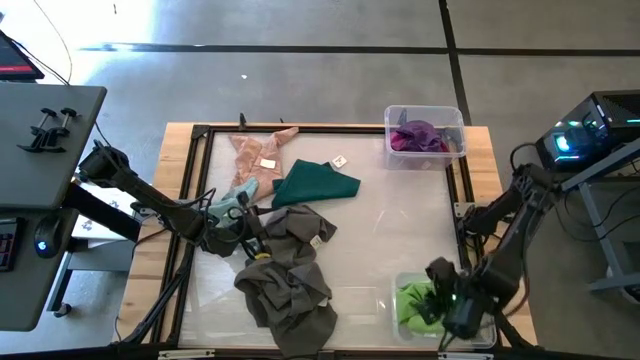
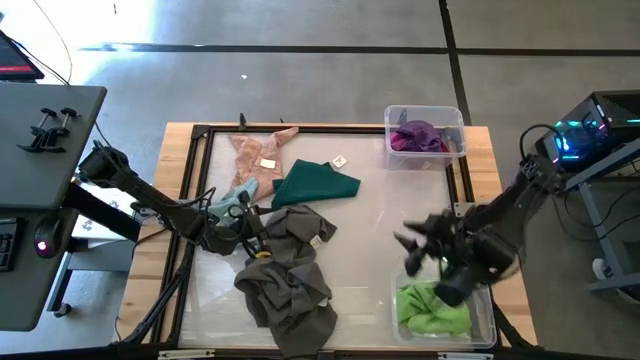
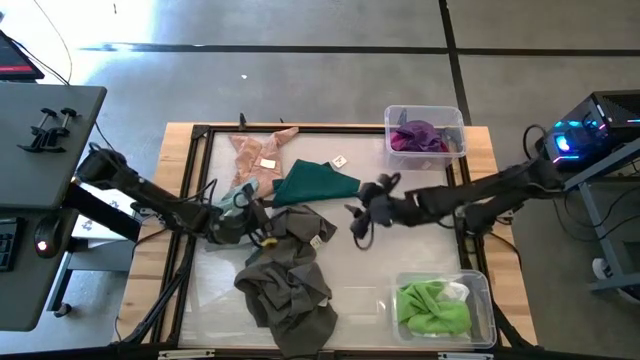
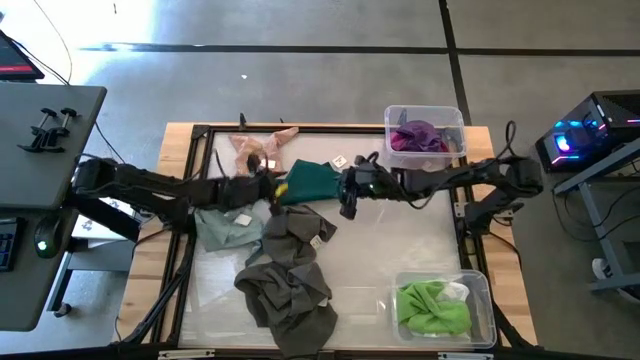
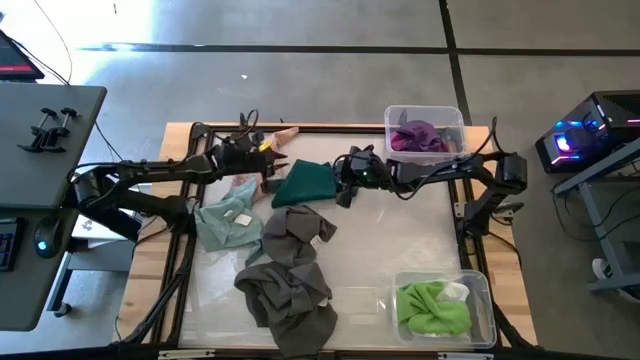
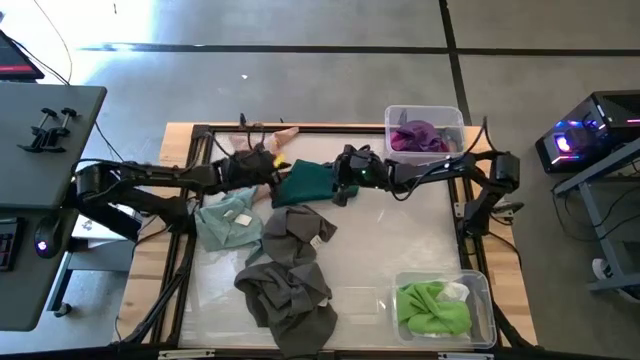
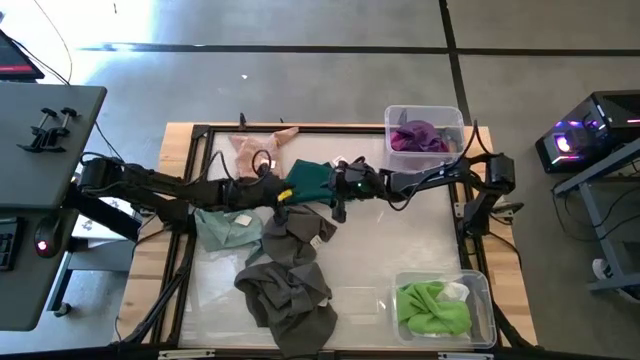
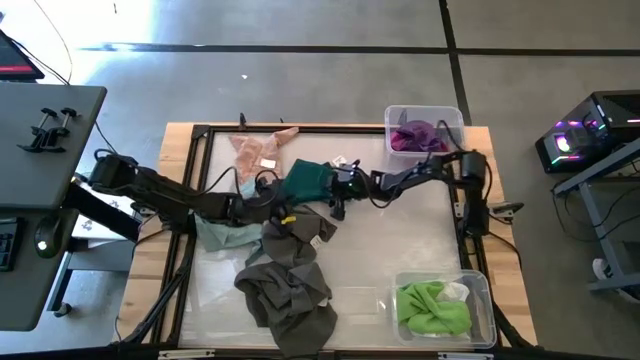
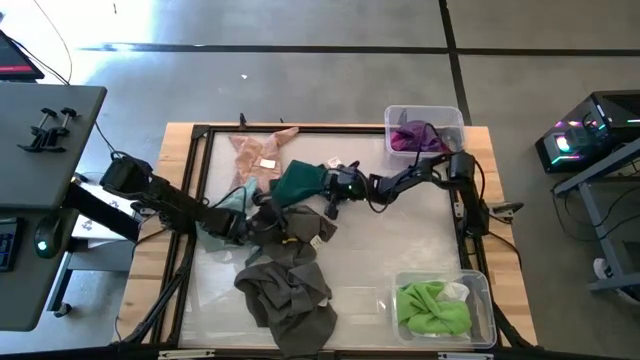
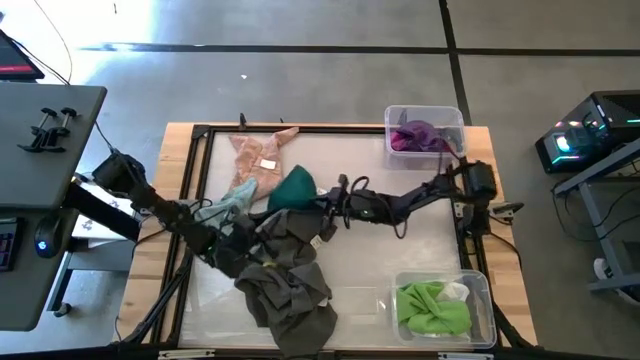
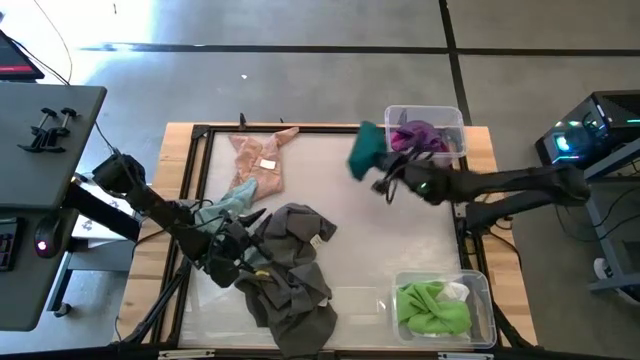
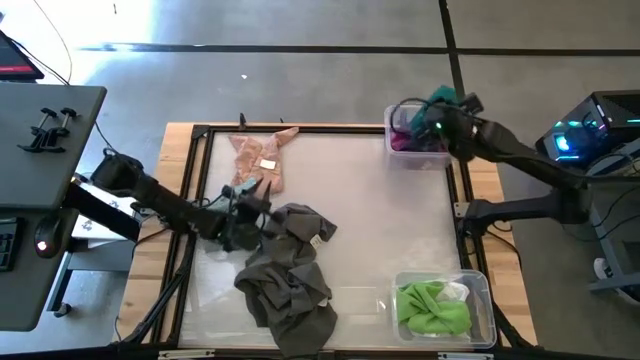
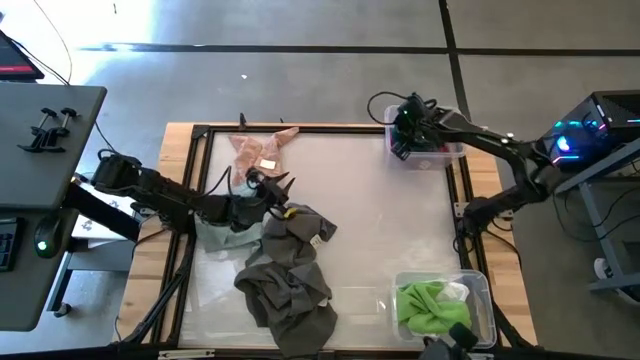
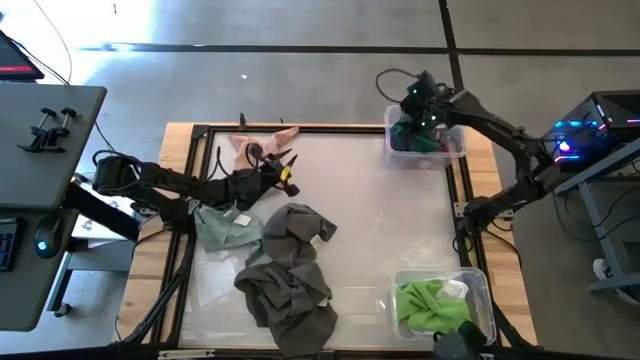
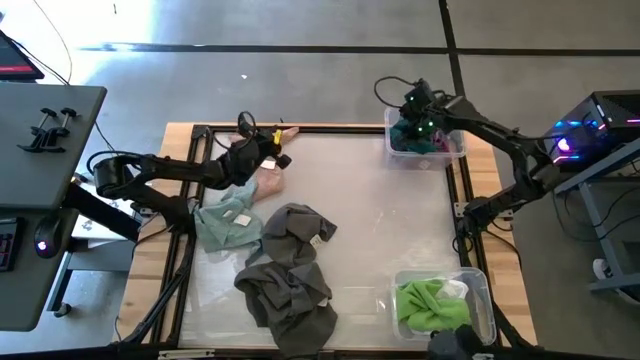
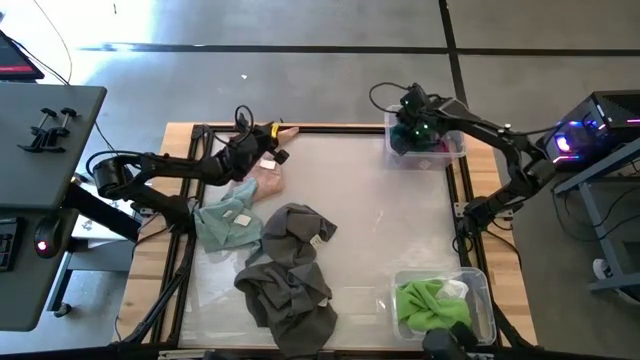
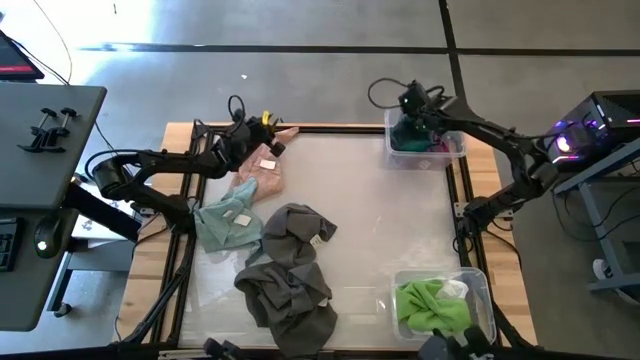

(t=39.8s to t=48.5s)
Task: Sort towels by color in basket
Put the dark green towel into the top transparent bin

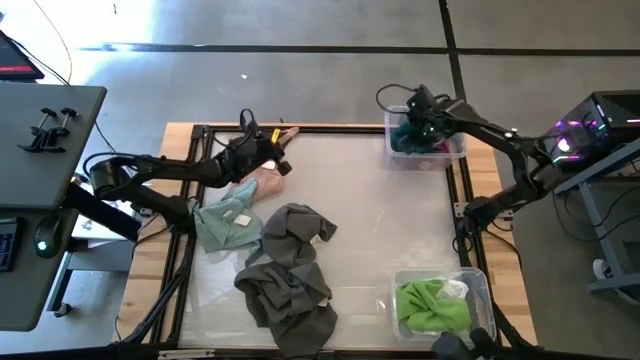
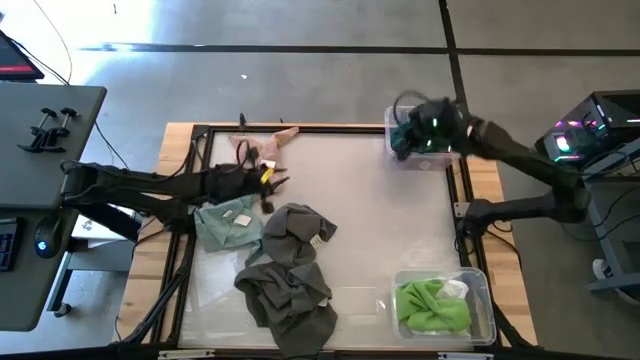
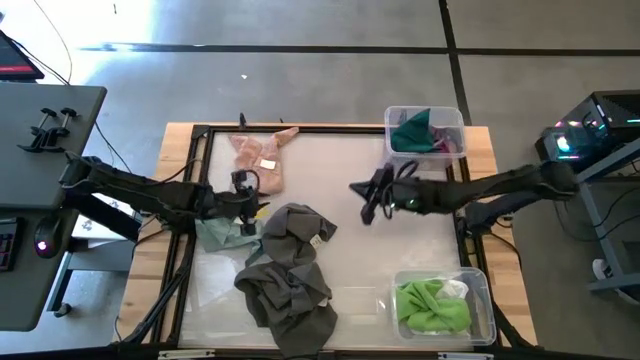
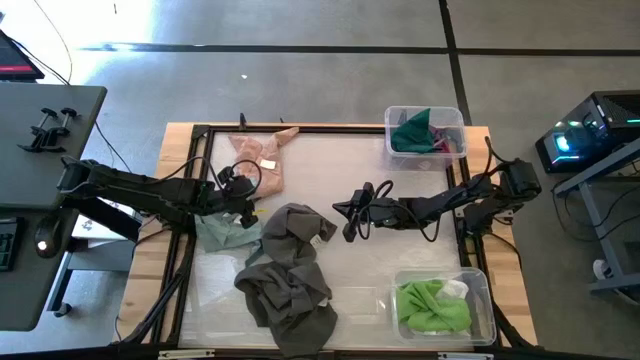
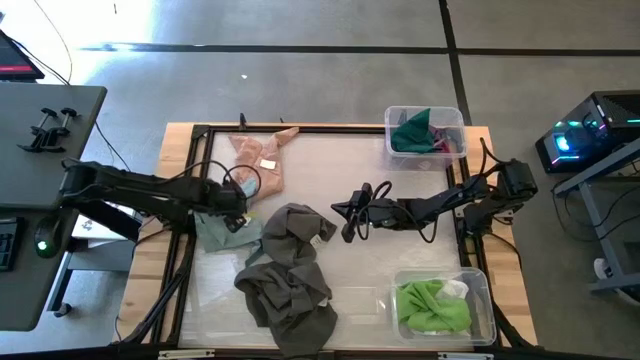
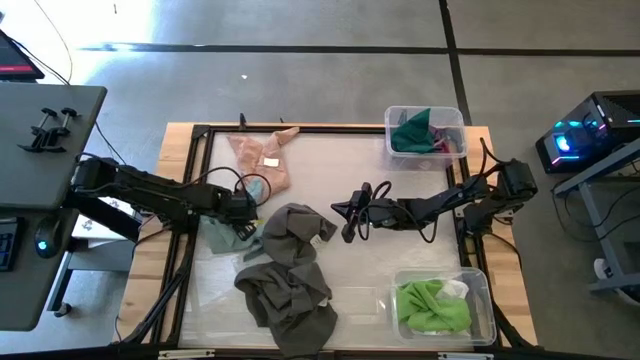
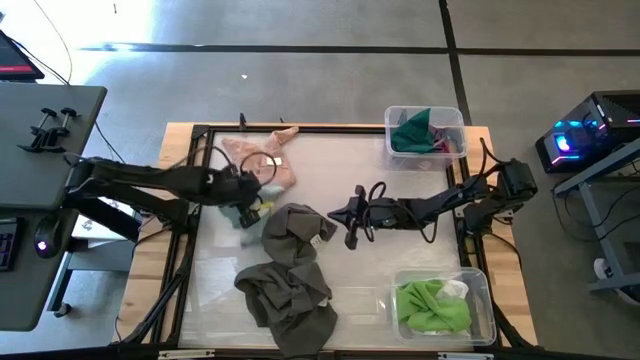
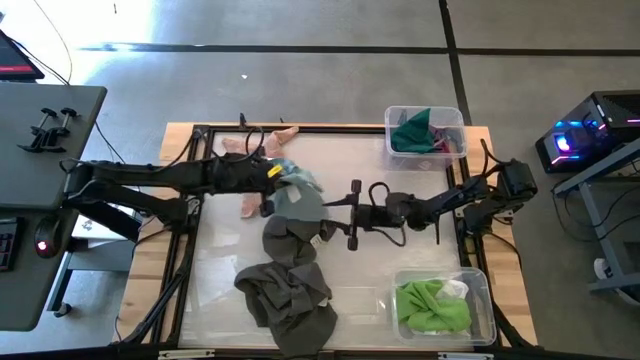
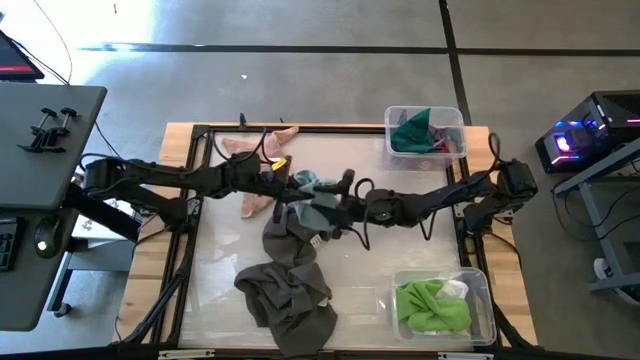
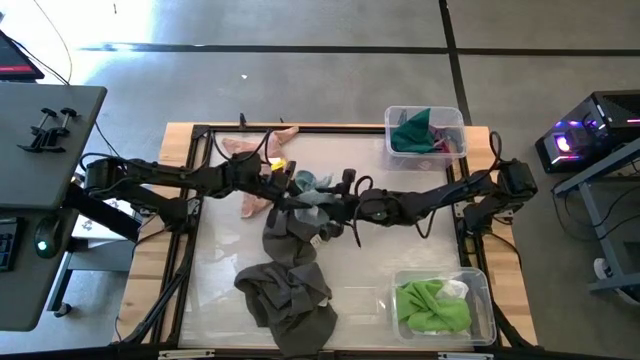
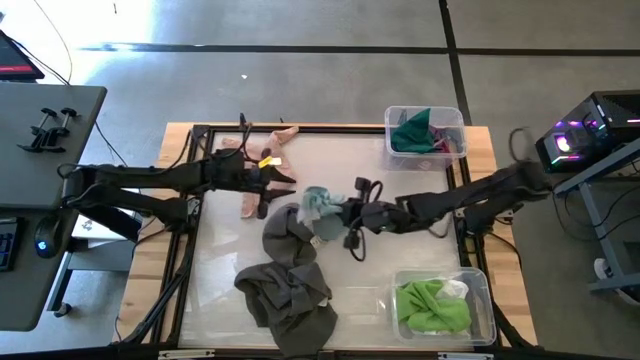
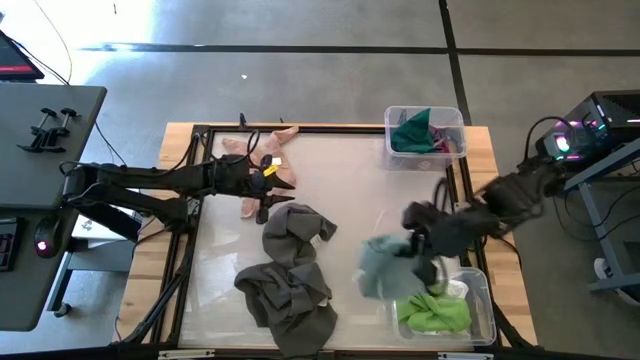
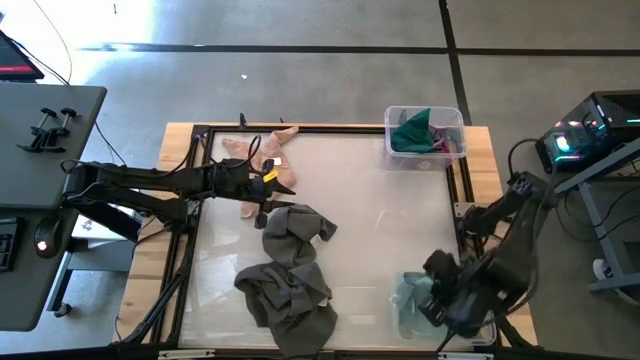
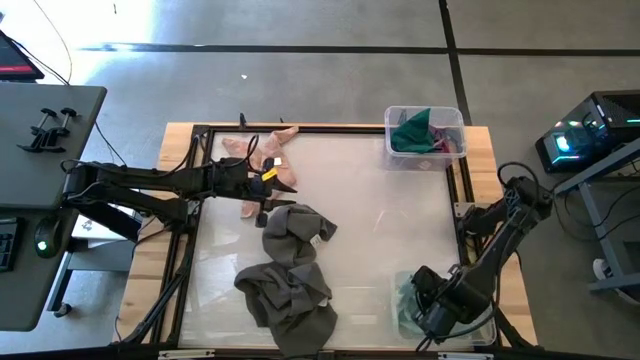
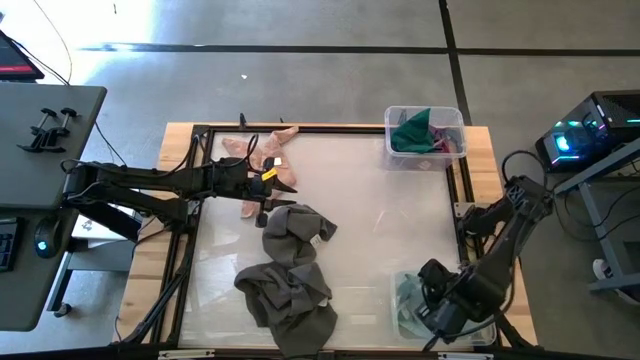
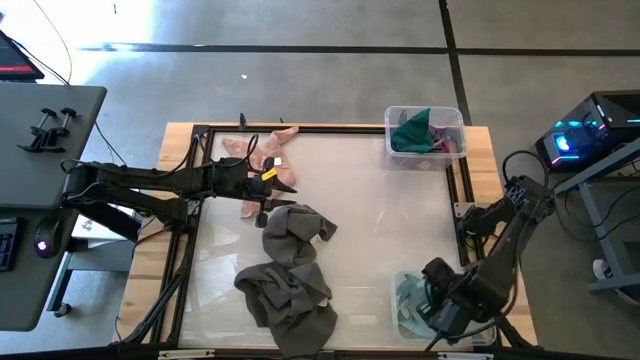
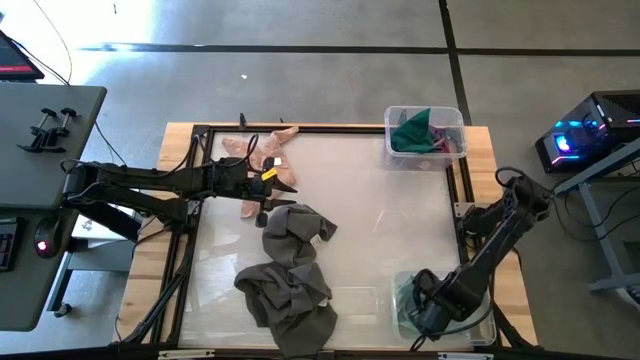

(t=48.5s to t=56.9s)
Put the blue towel into the bottom transparent bin

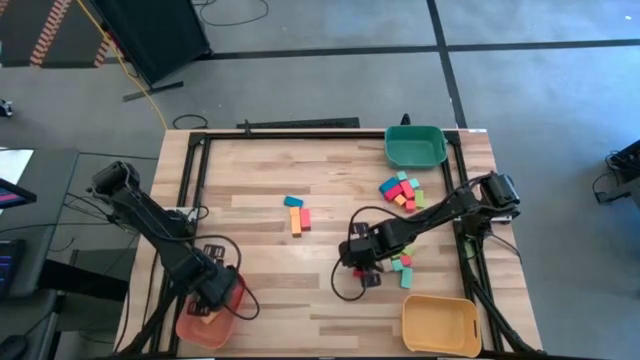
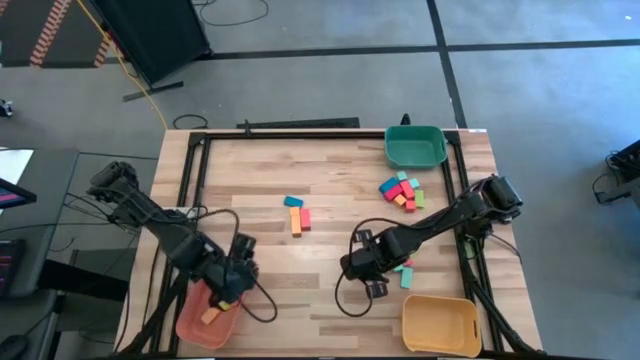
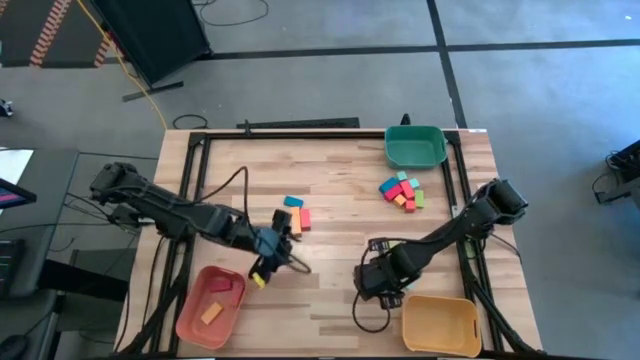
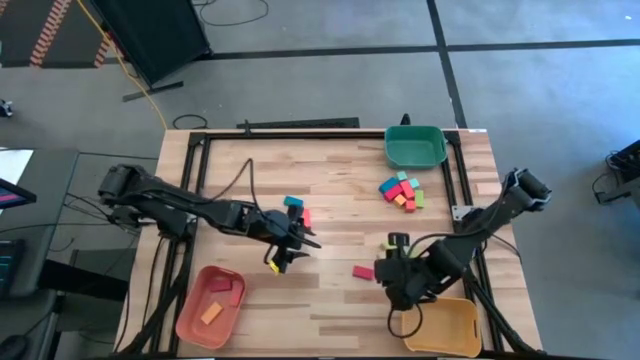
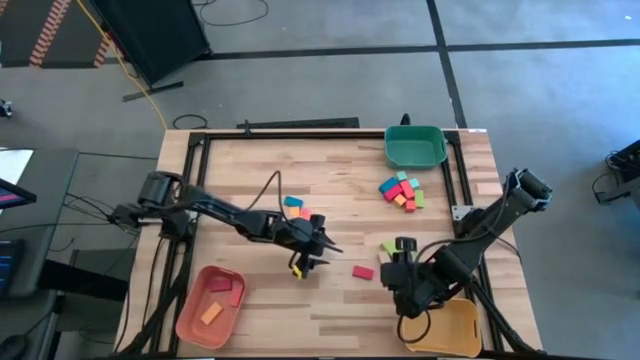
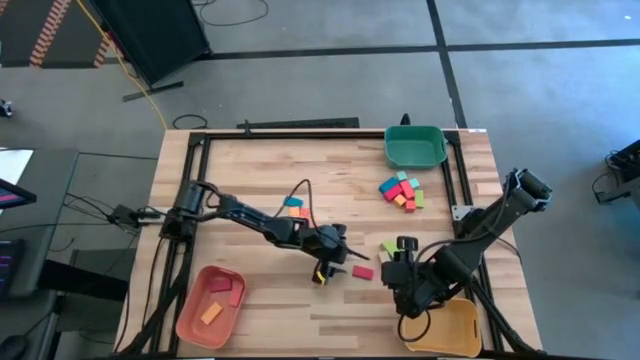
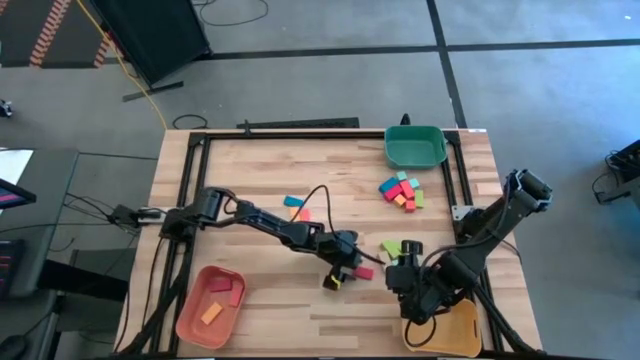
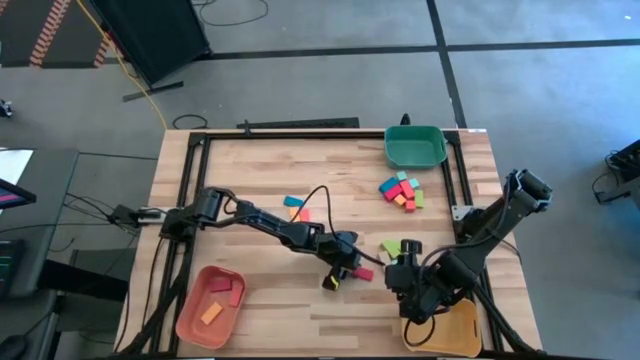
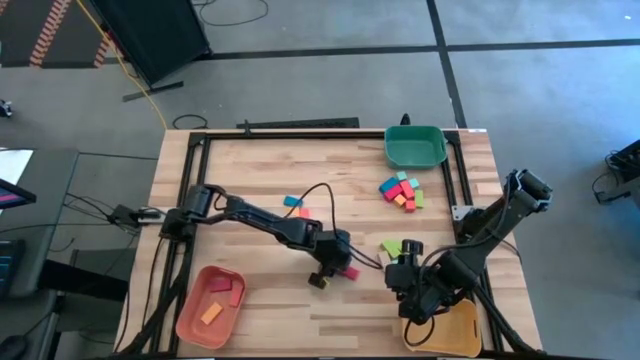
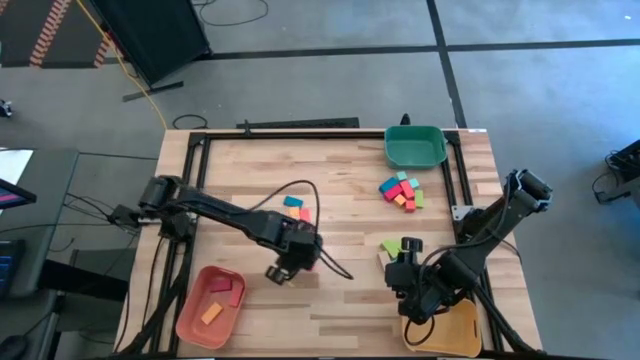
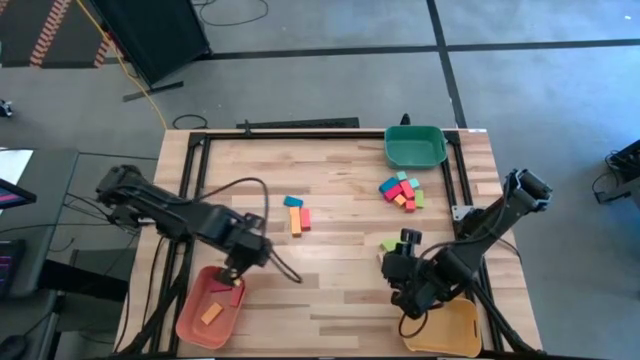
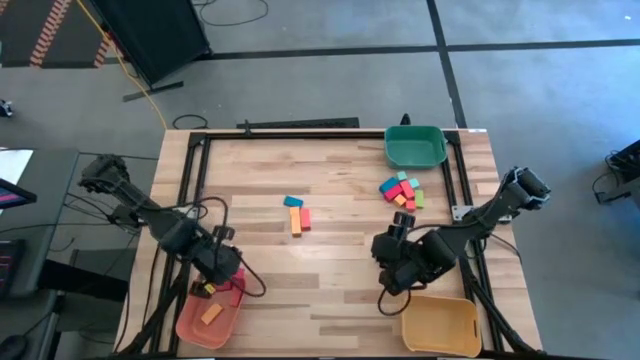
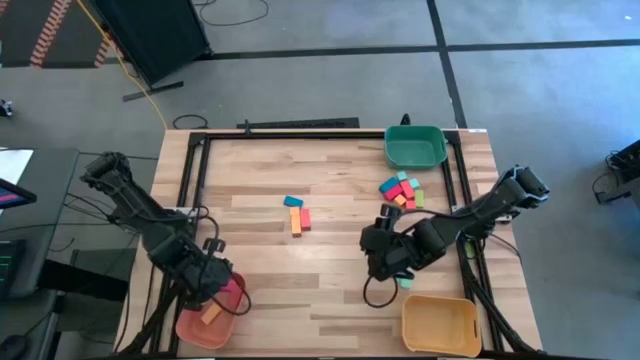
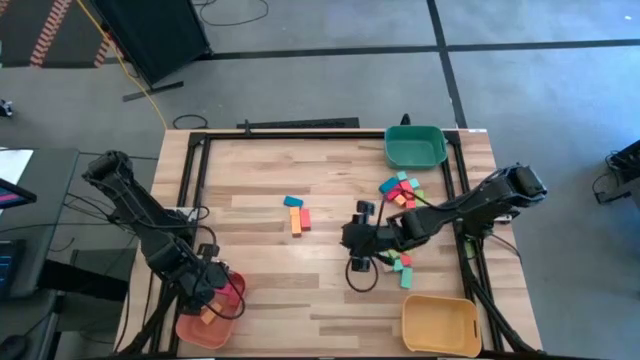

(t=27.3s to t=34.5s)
Task: Sort blocks by size
Put the medium red rectangular block into the orange bin
